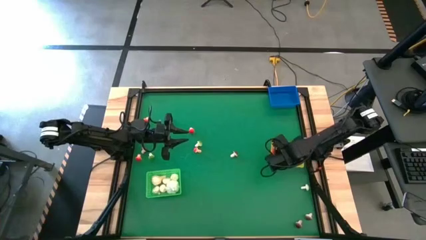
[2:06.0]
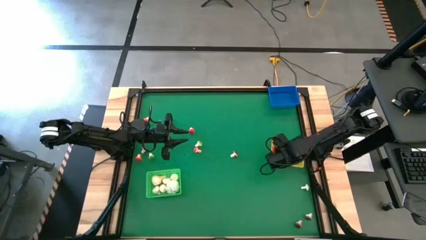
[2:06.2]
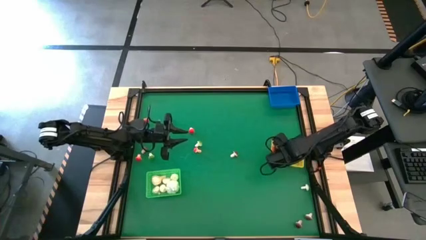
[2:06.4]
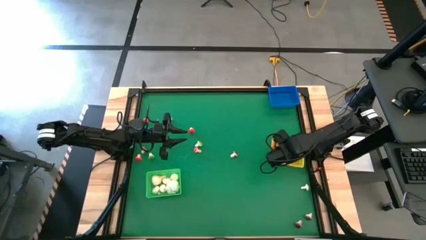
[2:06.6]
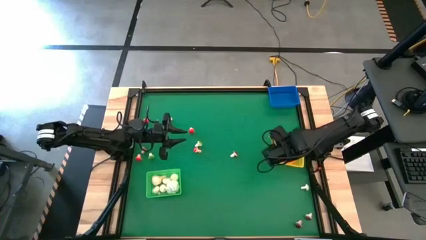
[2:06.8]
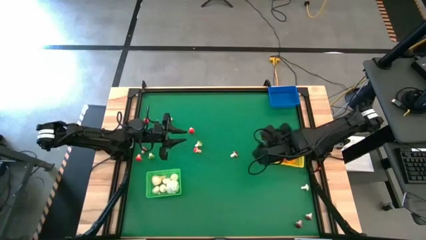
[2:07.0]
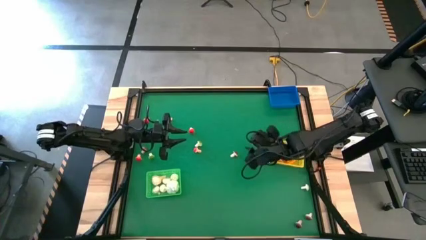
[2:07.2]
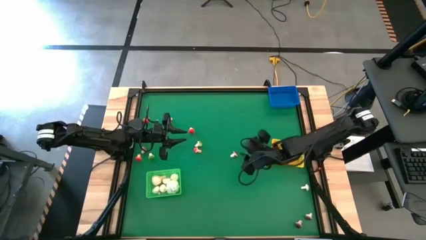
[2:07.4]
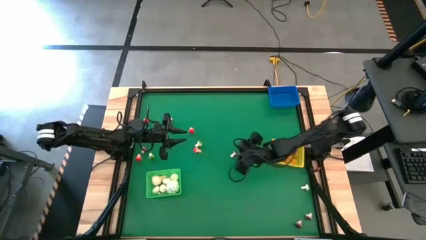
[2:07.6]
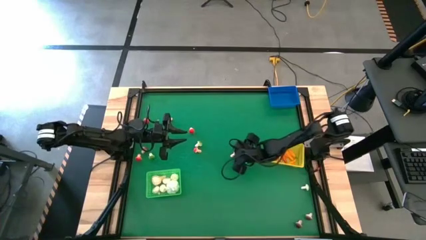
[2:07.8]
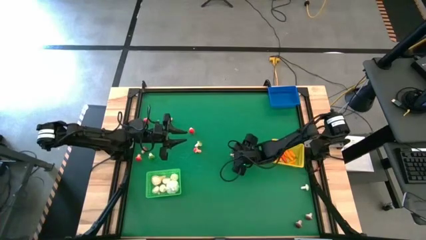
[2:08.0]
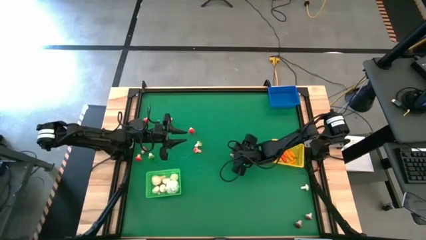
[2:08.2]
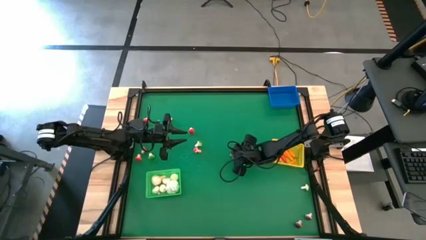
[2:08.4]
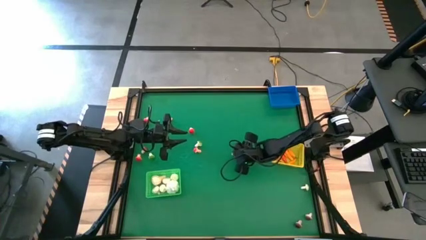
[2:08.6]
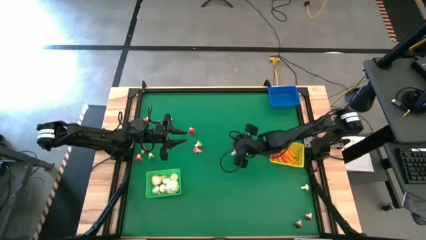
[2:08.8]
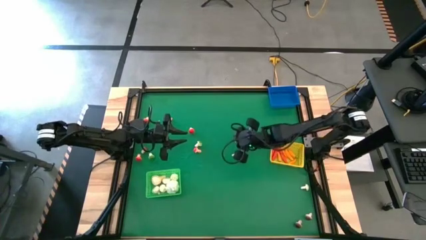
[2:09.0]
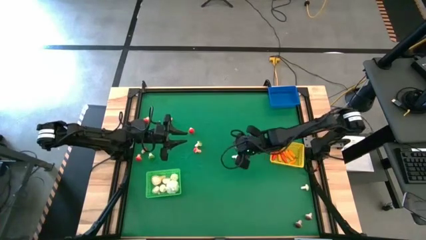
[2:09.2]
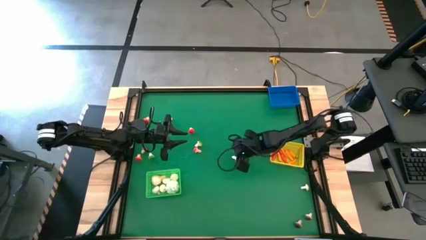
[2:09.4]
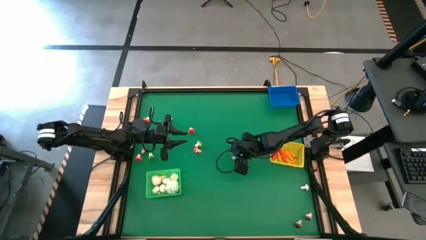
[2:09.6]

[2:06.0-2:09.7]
Task: Sort produce into baskets
Put the brown mushroom into the blue bin

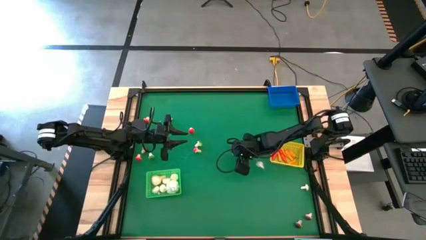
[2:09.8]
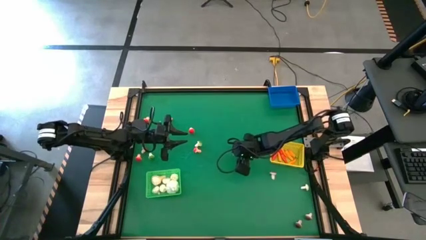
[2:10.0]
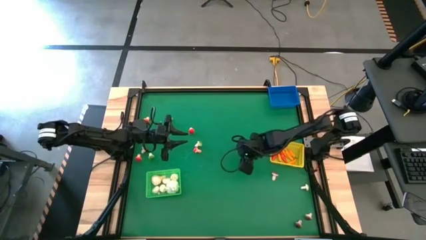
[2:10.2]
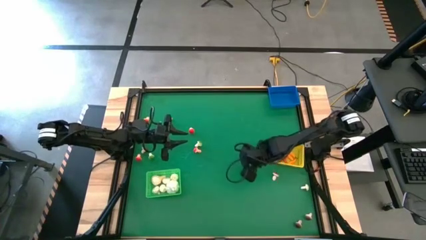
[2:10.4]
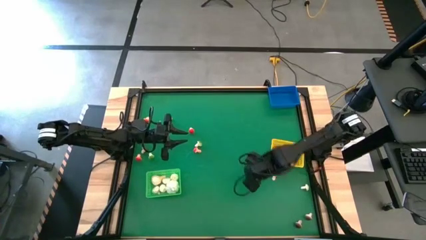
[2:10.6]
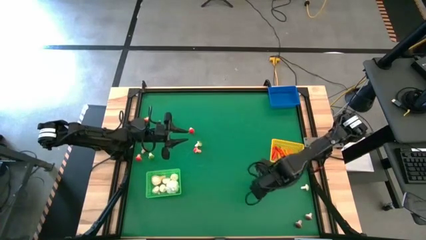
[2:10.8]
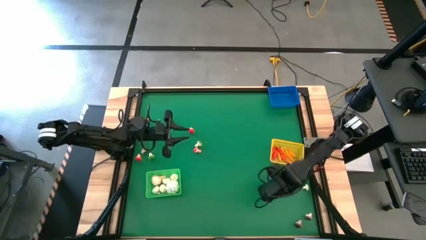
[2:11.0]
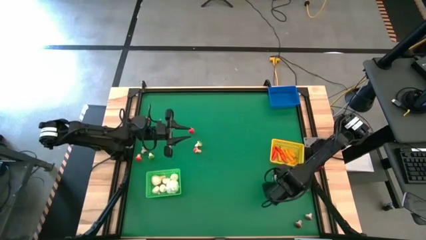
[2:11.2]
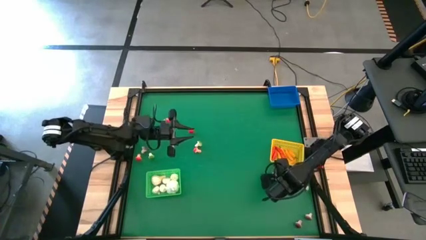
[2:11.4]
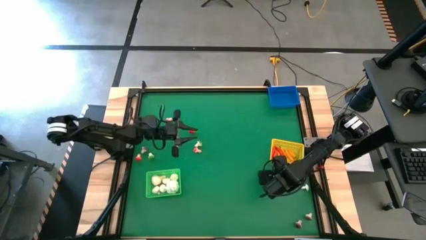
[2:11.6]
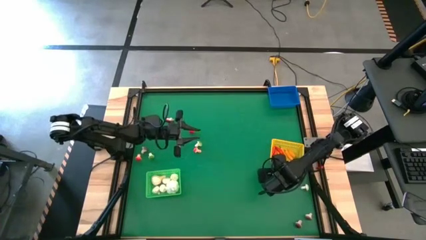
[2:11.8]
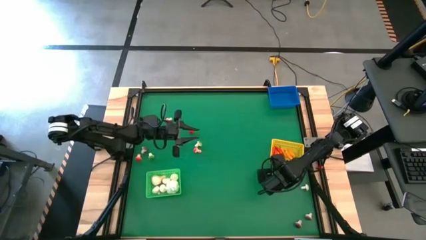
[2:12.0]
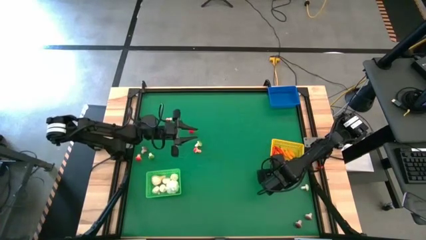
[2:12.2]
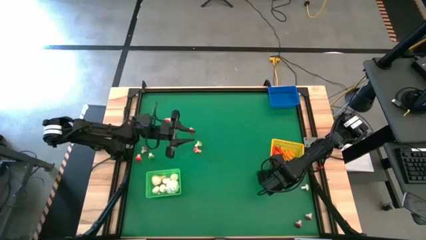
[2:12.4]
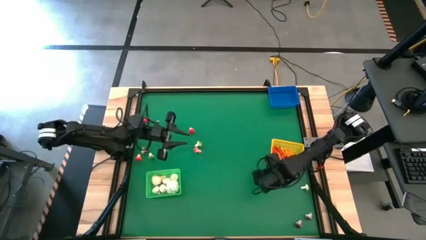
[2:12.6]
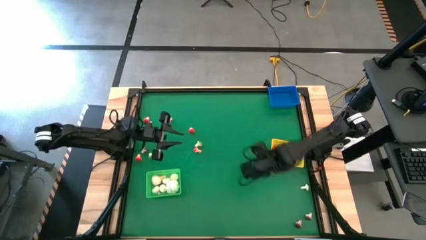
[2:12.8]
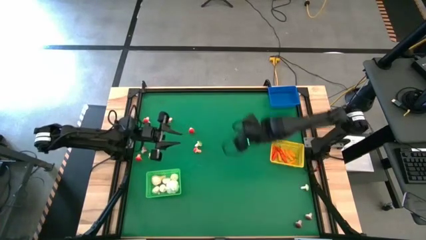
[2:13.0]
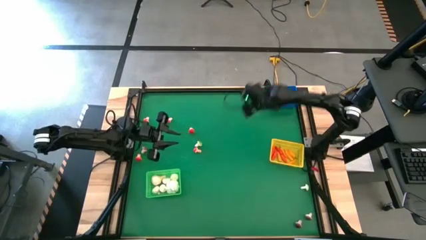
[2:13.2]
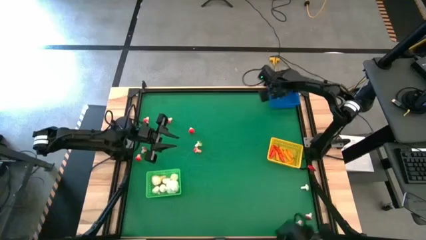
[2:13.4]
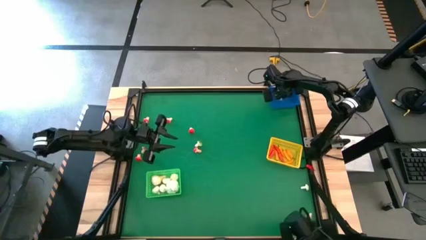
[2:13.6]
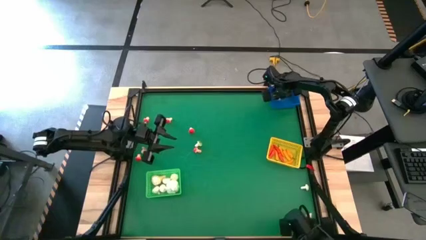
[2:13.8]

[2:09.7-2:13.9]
Put the brown mushroom into the blue bin

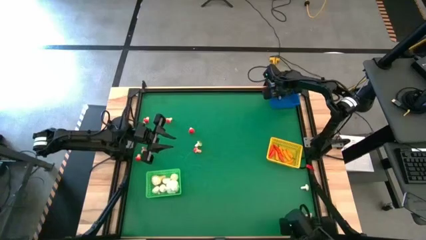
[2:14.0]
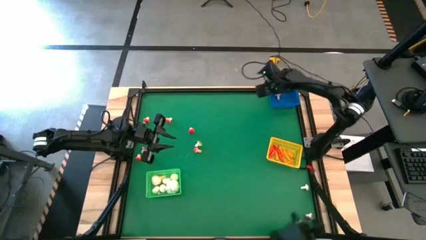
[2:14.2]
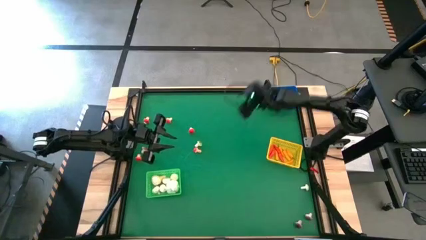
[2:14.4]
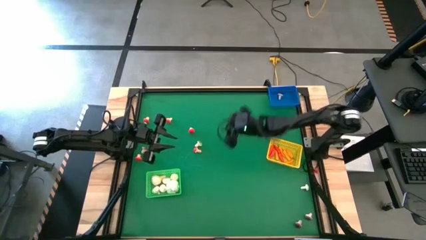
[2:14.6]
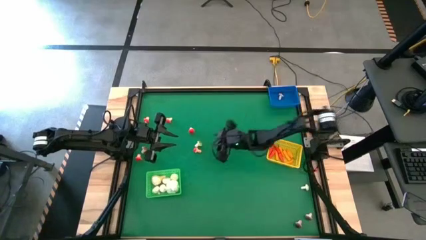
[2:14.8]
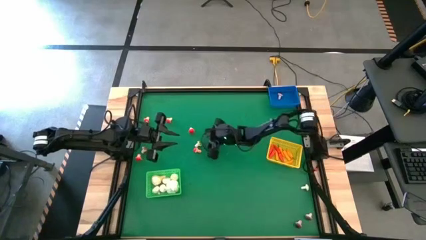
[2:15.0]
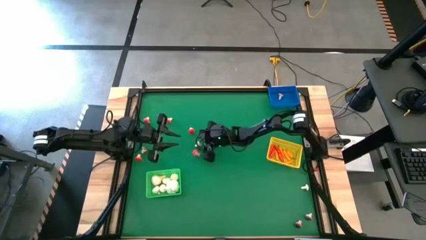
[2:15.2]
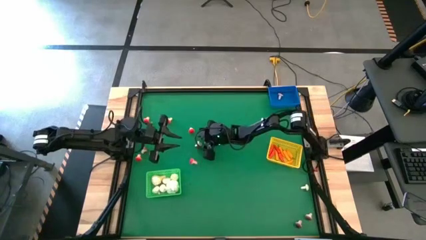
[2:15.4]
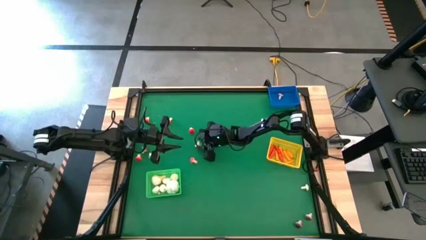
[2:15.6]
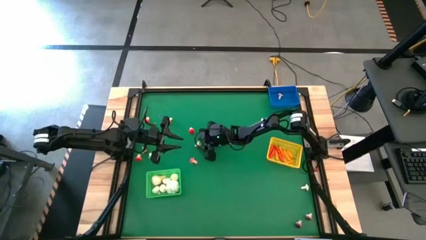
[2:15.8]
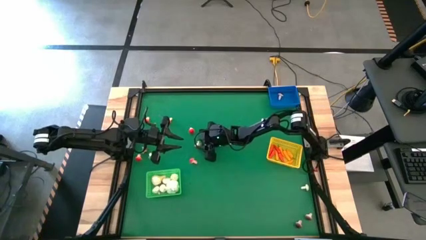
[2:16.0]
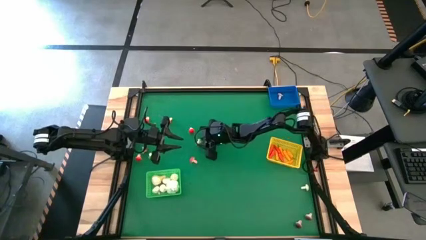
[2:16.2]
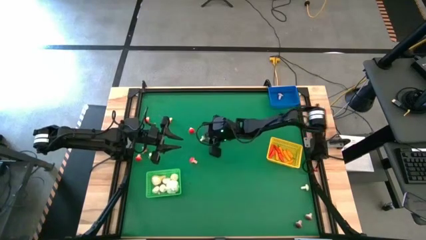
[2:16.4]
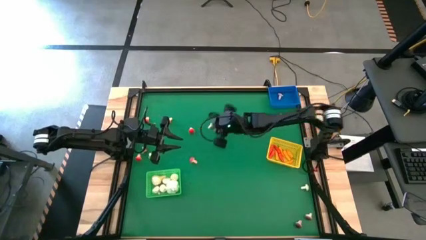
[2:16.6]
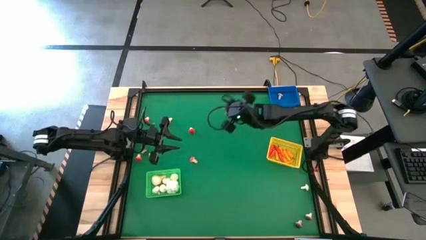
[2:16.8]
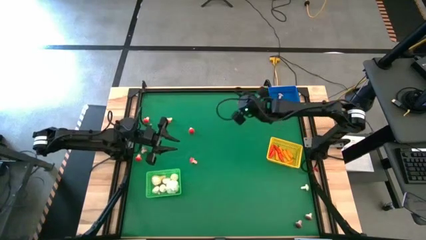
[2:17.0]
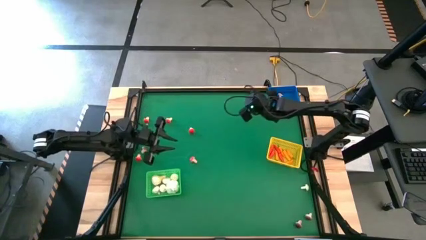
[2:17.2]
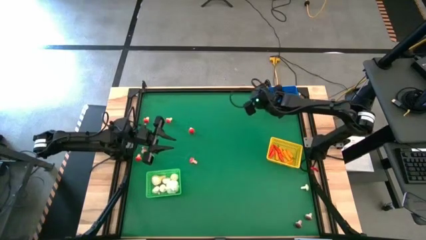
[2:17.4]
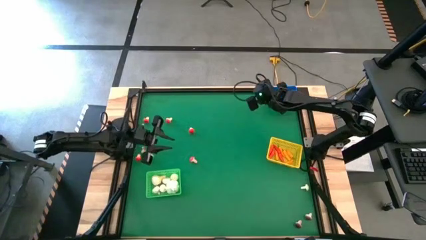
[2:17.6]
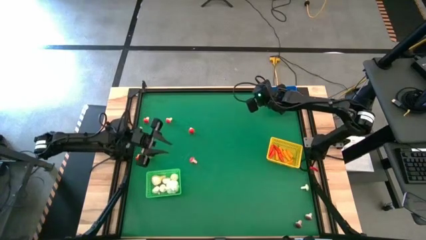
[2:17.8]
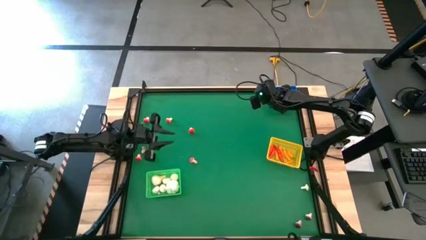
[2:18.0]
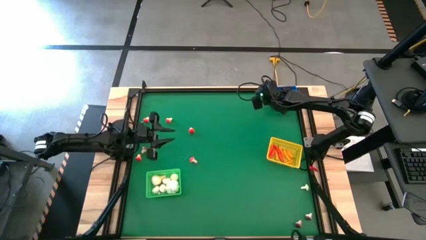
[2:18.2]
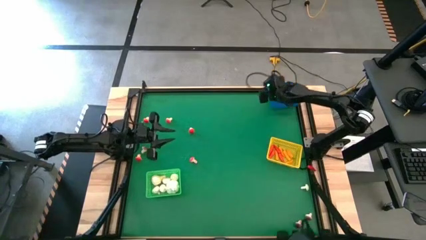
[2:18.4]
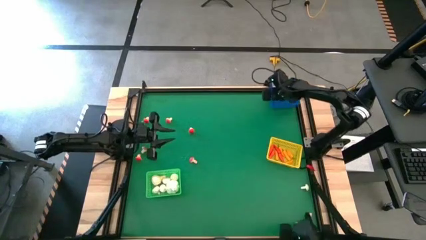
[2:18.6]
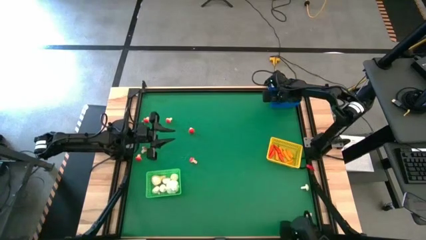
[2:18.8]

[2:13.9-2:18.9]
Put the green mushroom into the blue bin

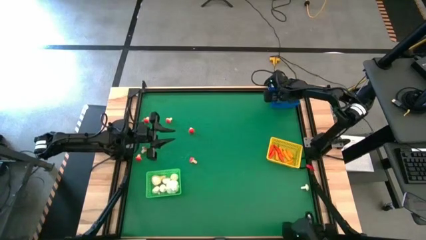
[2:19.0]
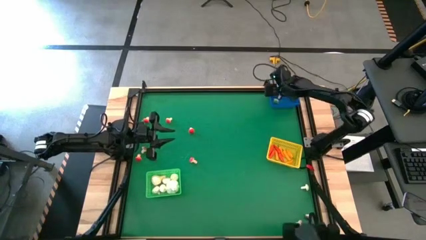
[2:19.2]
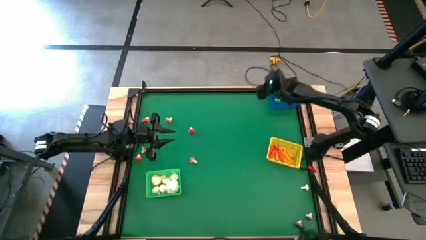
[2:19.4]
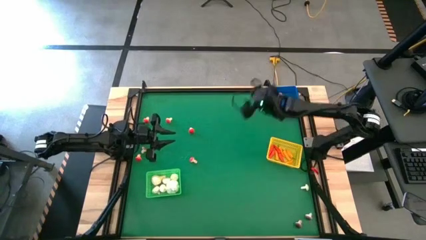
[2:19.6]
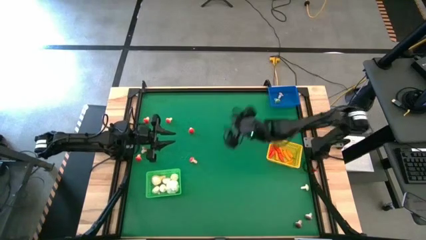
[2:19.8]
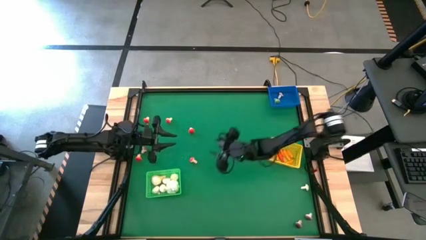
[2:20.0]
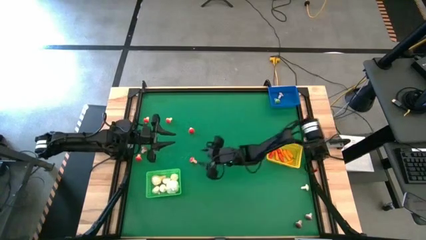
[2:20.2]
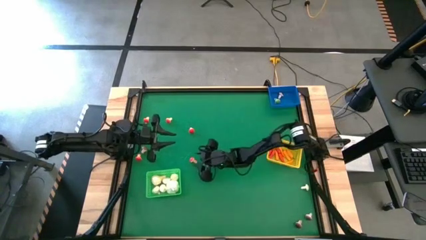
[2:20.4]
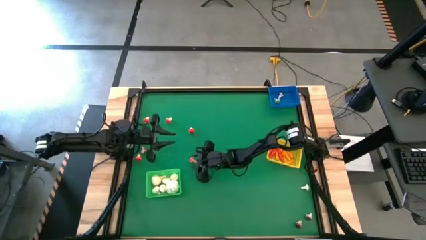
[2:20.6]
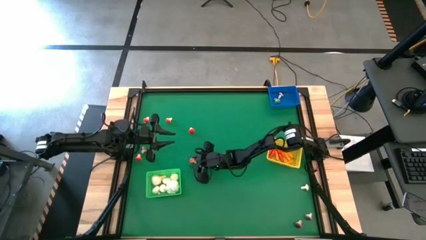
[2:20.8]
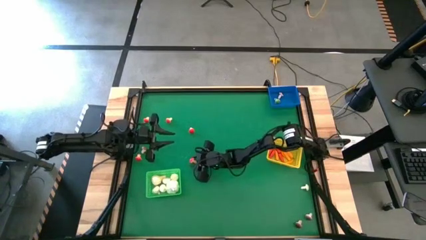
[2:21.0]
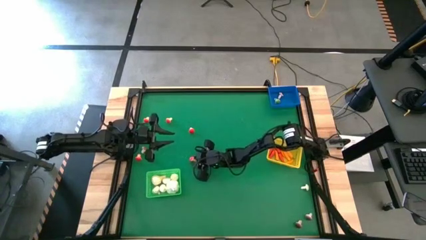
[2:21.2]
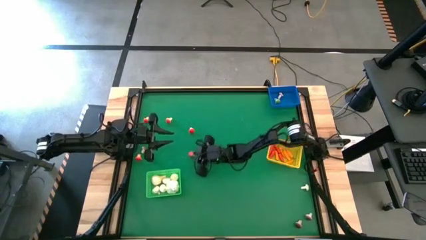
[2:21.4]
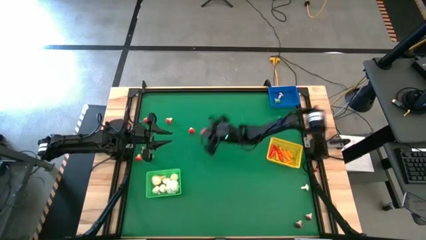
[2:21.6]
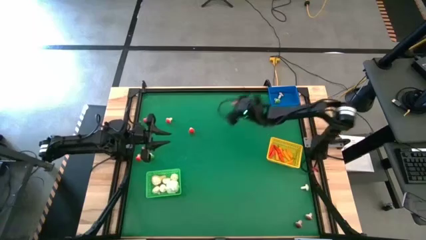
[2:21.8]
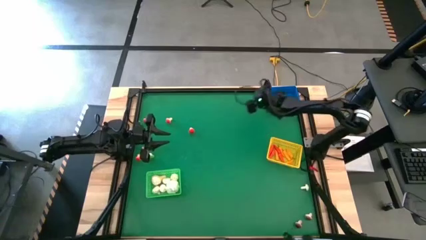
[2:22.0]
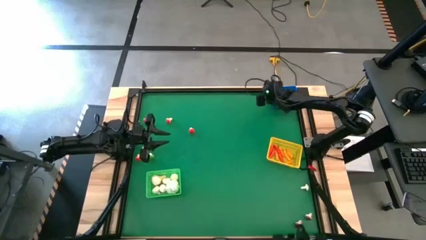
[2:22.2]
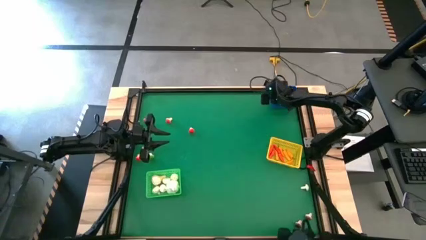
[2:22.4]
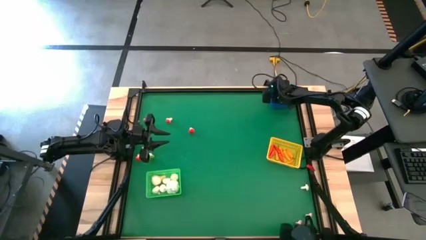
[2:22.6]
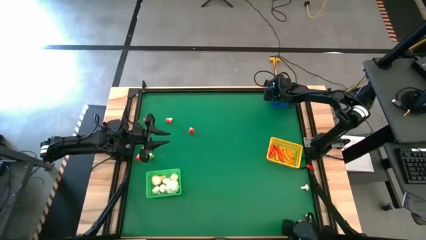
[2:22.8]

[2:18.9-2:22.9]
Put the red mushroom into the blue bin
